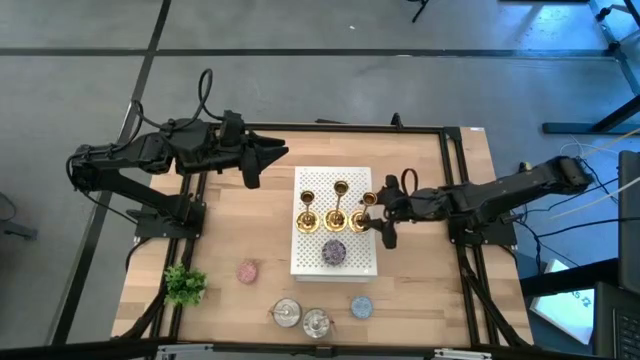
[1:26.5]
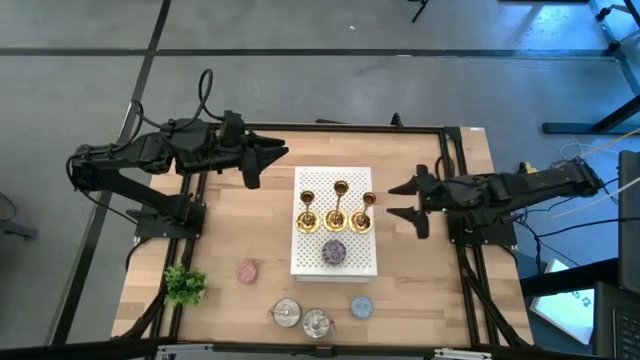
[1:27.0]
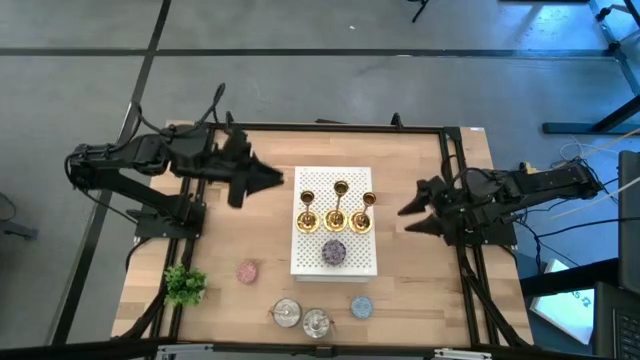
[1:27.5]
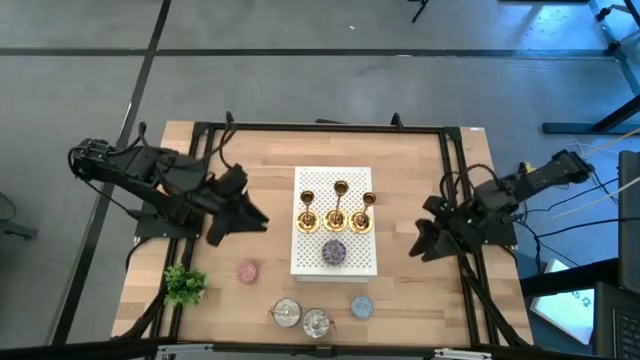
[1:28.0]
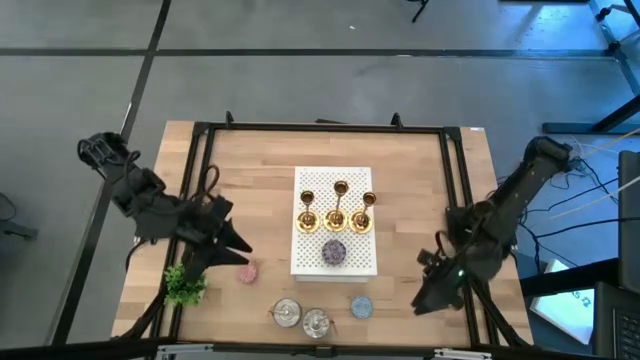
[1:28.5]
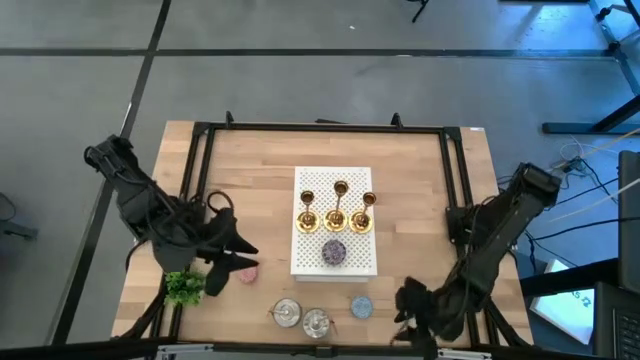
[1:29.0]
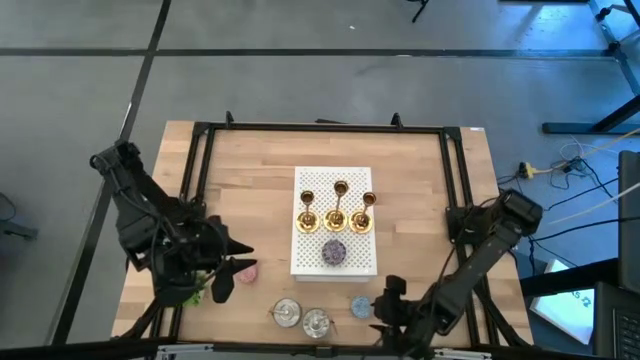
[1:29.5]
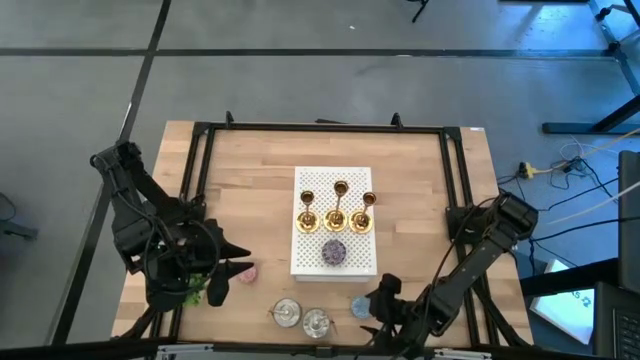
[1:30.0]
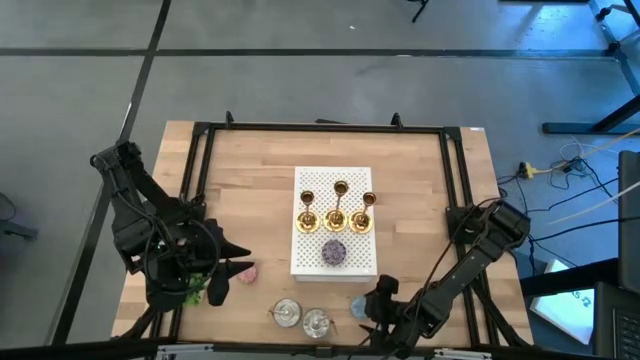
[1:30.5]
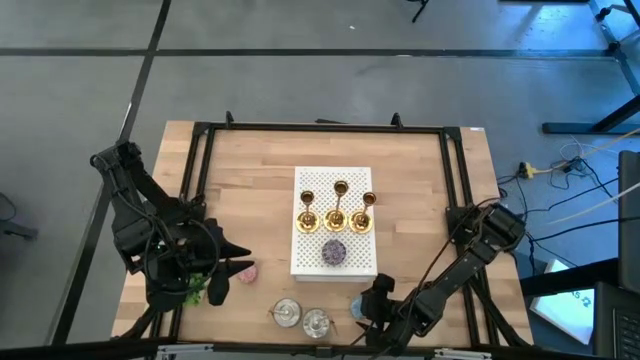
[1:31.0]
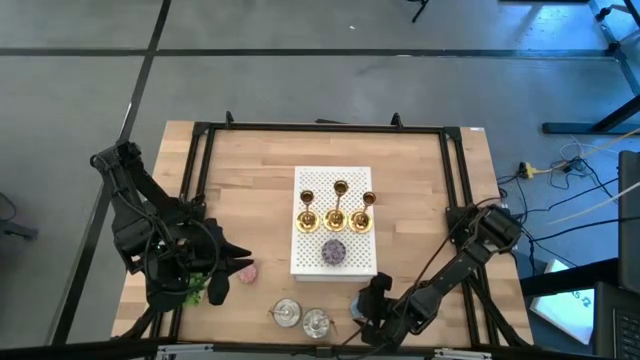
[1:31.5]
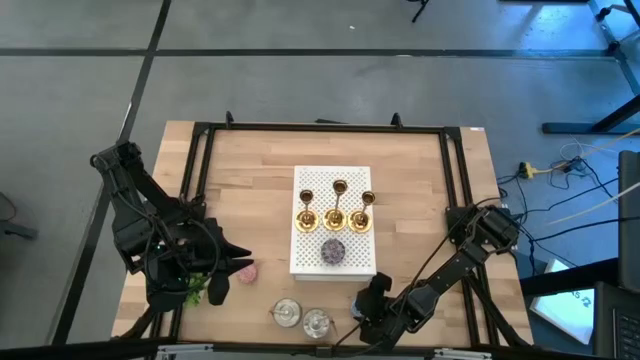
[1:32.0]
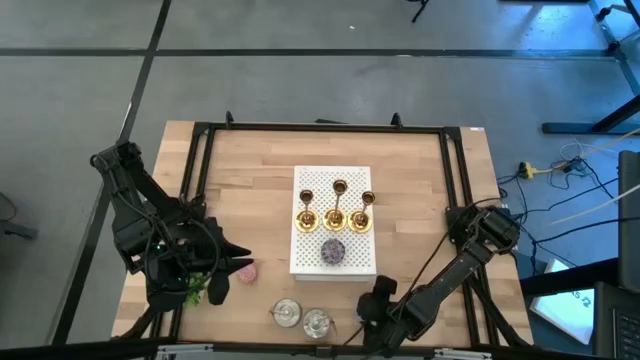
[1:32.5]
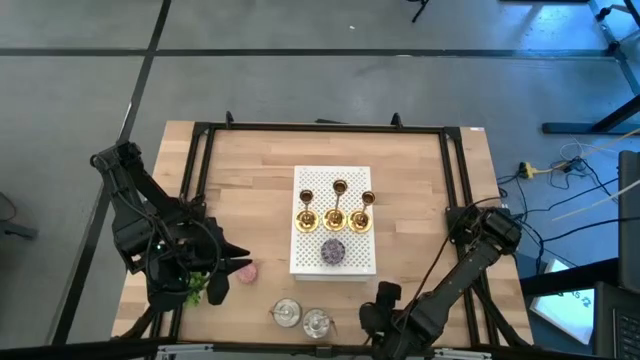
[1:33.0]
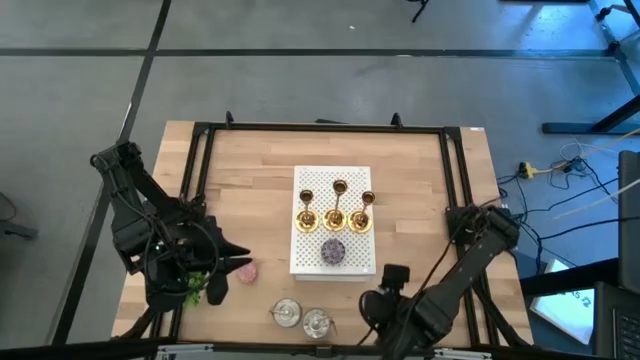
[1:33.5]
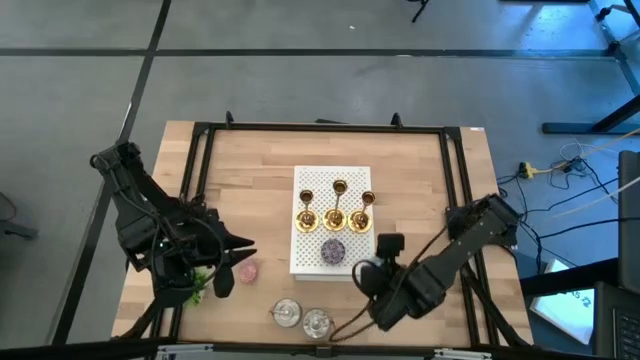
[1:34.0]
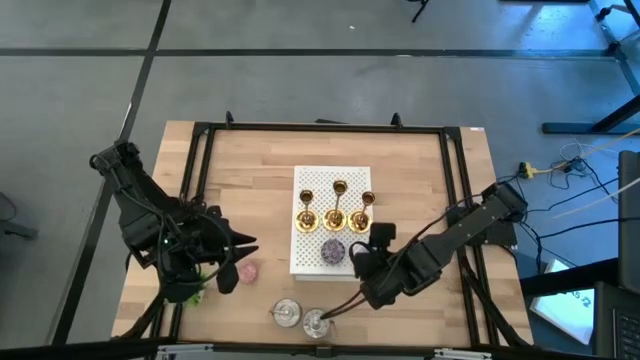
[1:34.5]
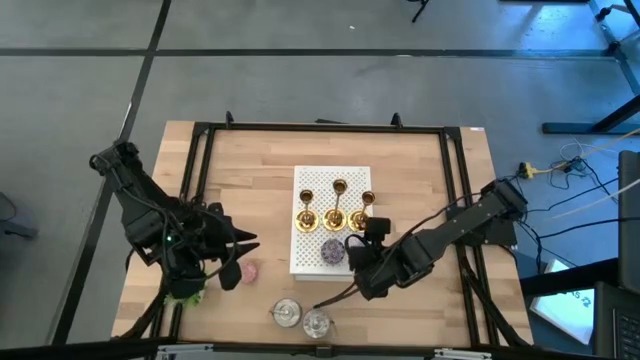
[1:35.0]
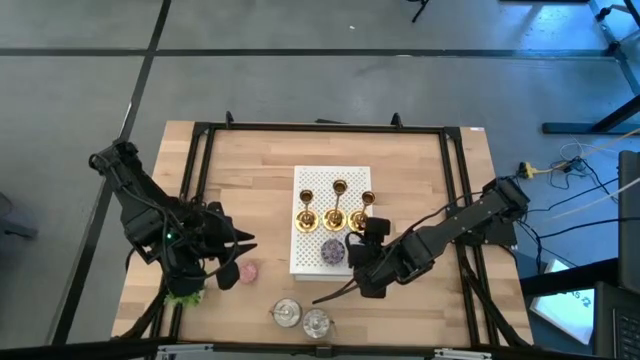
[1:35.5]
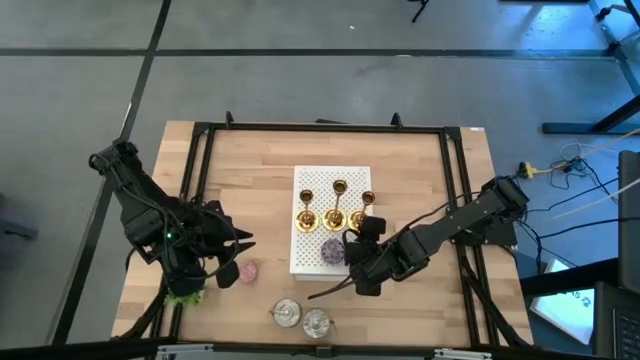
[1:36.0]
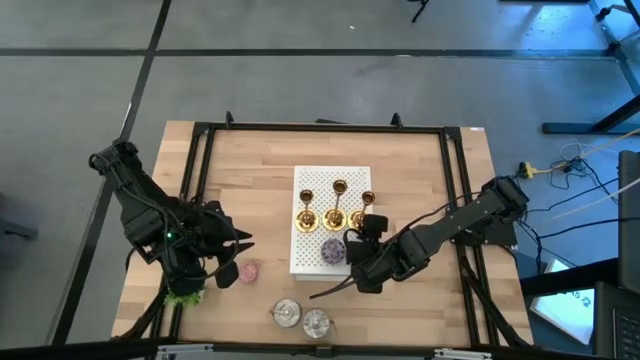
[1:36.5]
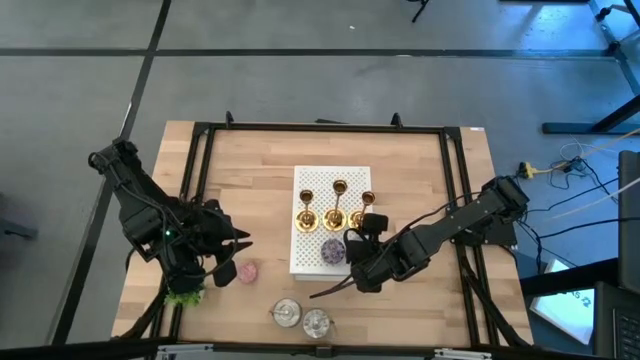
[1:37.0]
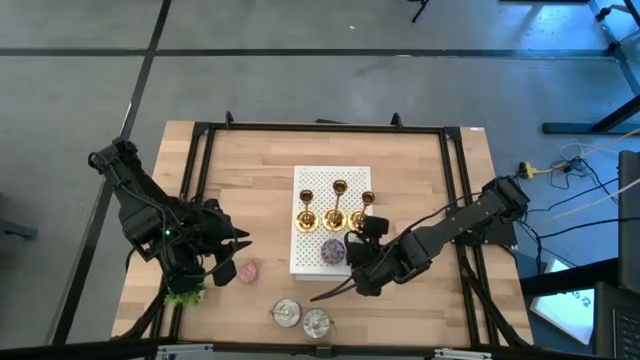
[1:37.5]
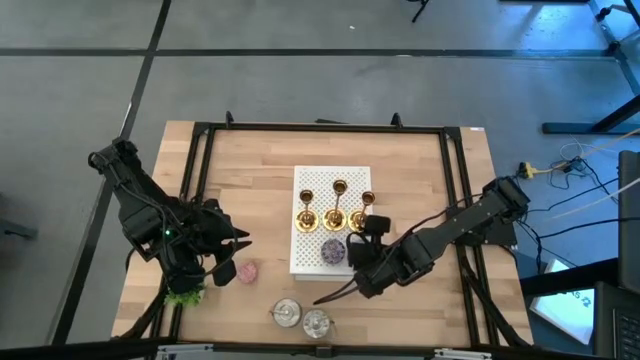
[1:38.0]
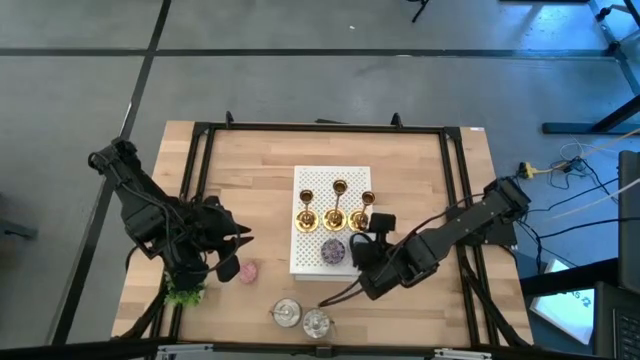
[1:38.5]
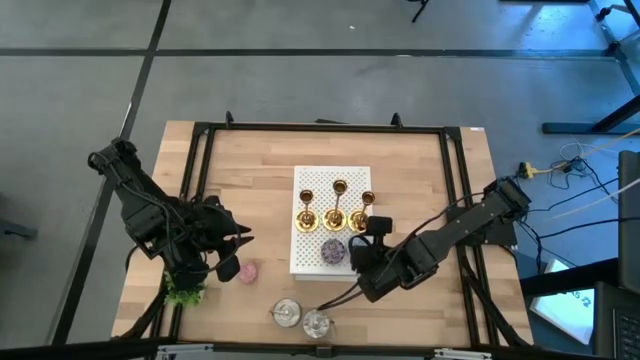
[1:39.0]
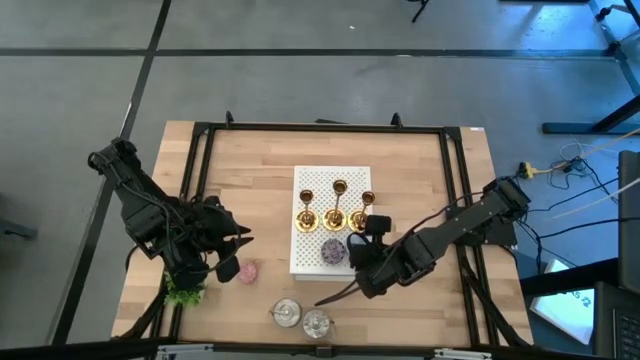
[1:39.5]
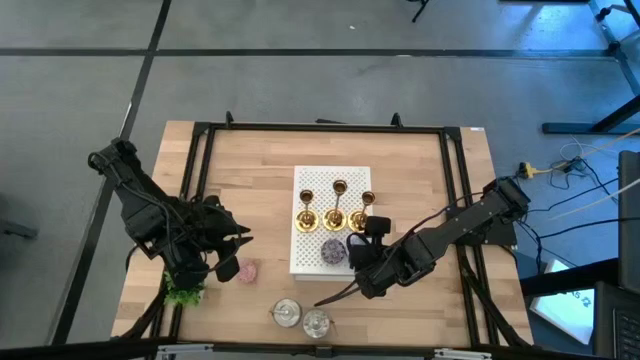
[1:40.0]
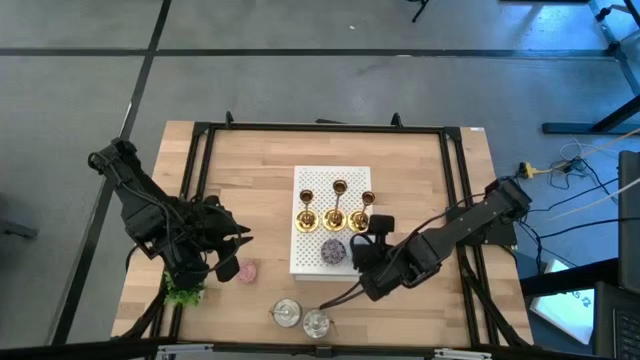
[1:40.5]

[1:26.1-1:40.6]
Task: Pick & Place candle stick holders
Put the blue patterned scented candle on the shelf aligned with the other red patterned scented candle

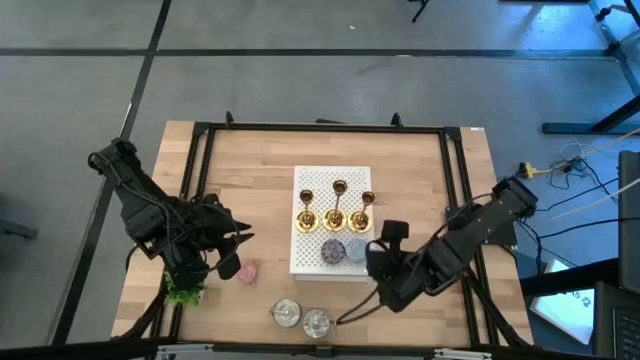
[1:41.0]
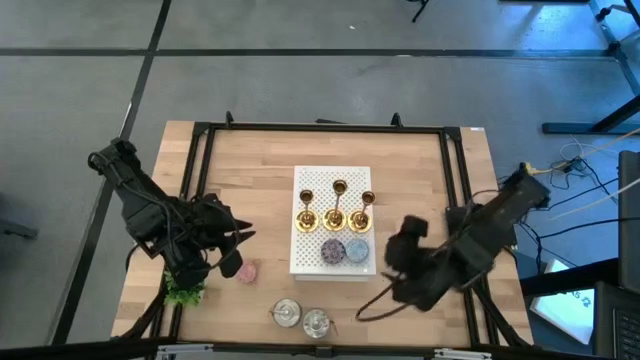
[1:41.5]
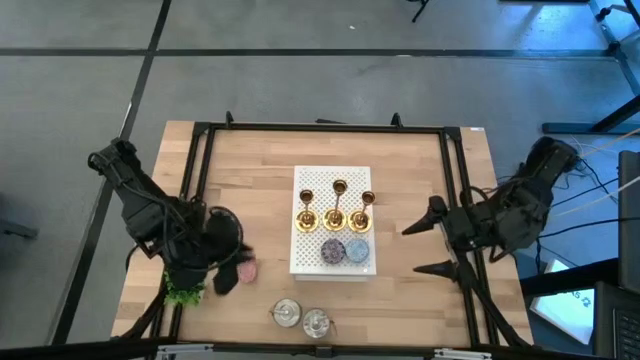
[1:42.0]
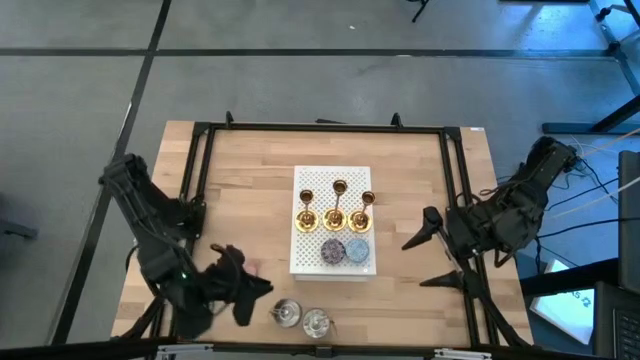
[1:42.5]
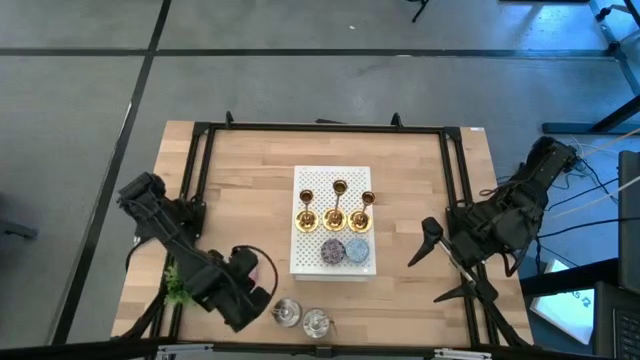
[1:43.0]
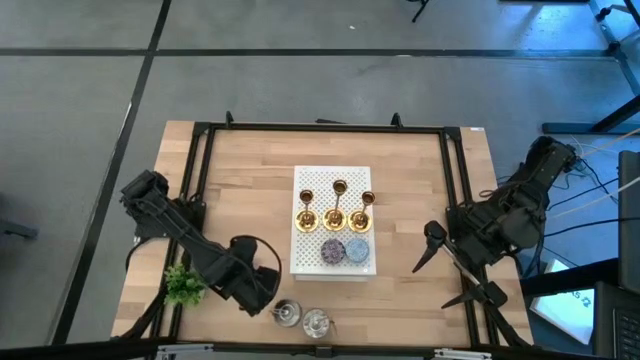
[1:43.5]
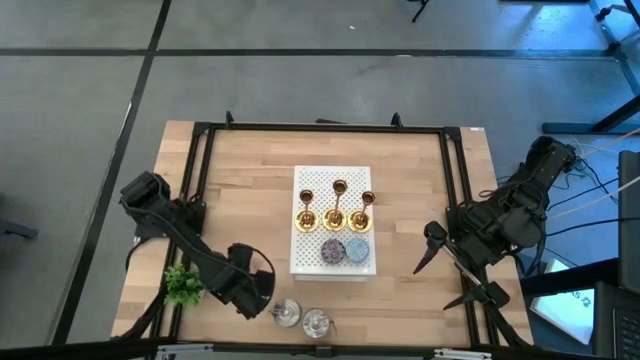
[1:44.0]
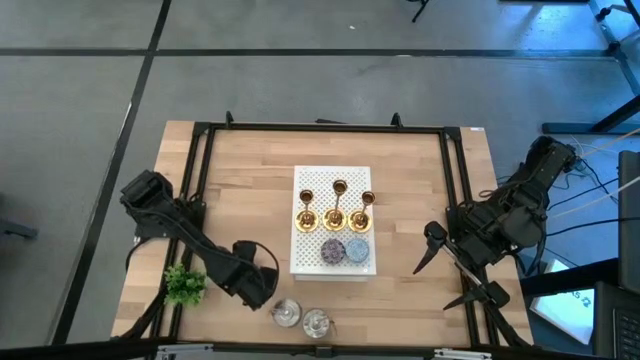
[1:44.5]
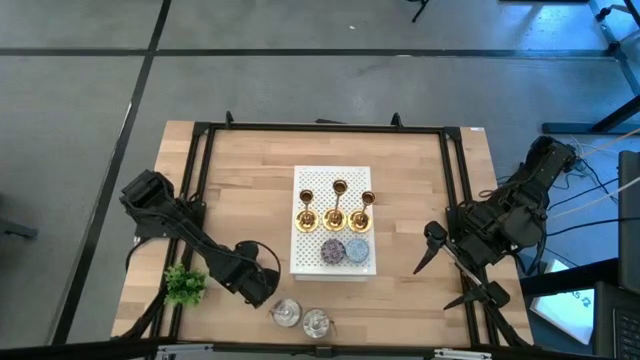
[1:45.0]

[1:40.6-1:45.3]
Put the pink patterned scented candle on the shelf aligned with the other red and blue patterned scented candles

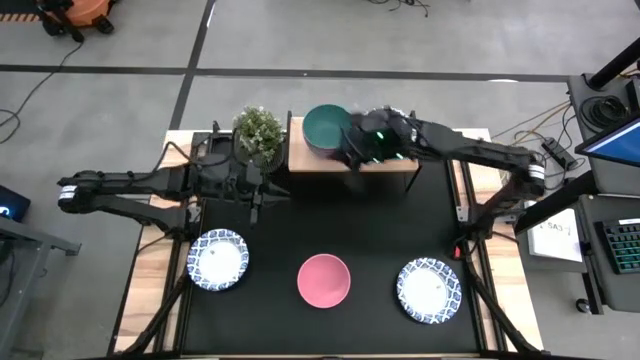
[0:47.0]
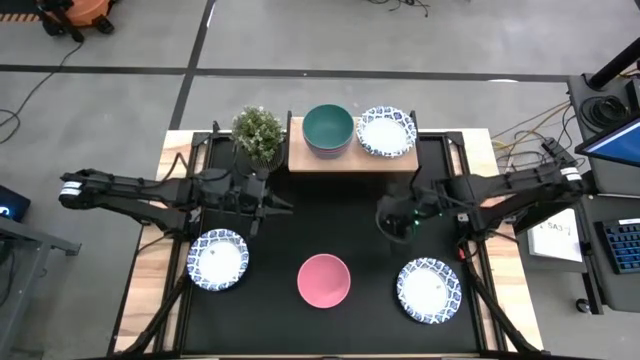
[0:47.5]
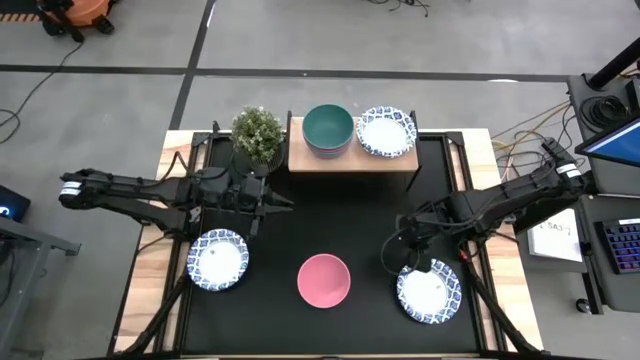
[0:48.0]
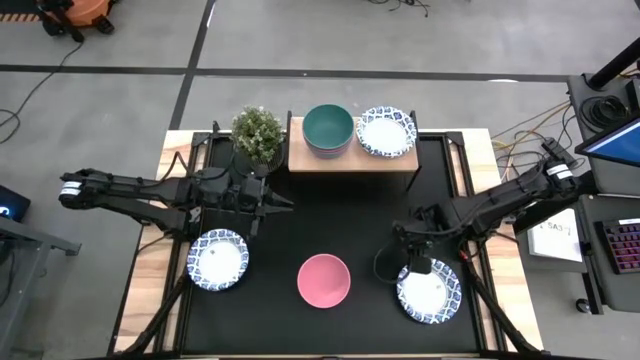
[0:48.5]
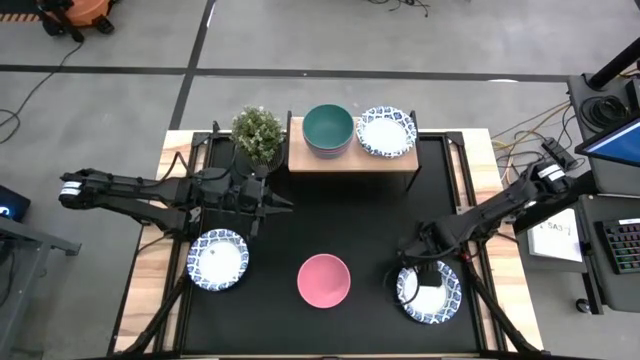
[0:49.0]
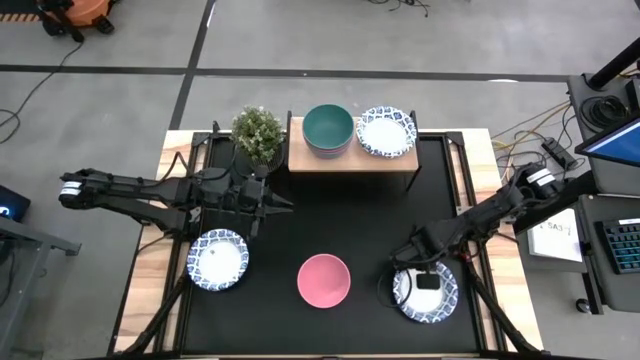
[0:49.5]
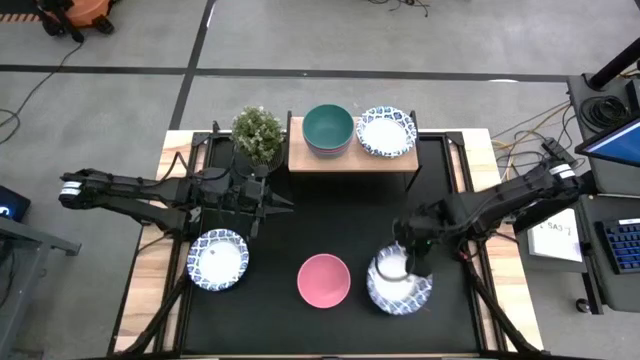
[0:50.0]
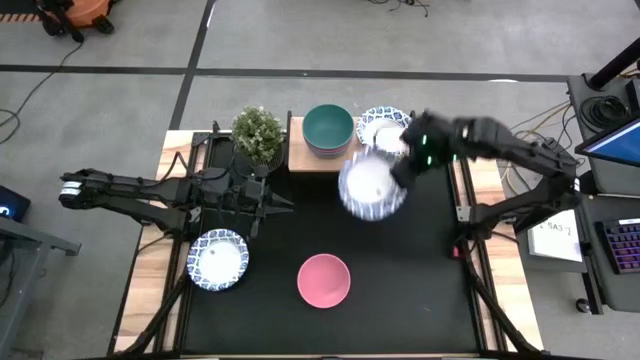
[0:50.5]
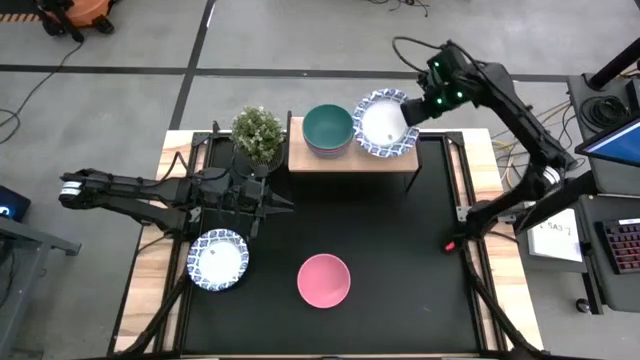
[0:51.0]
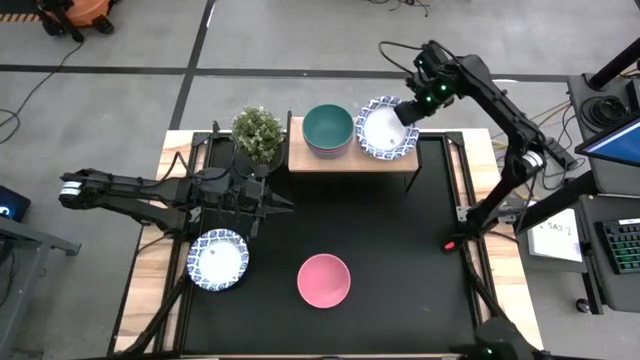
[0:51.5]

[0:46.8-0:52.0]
Task: Place and stack bowls onto a shelf
Stack the right white patterned bowl on top of the white patterned bowls
